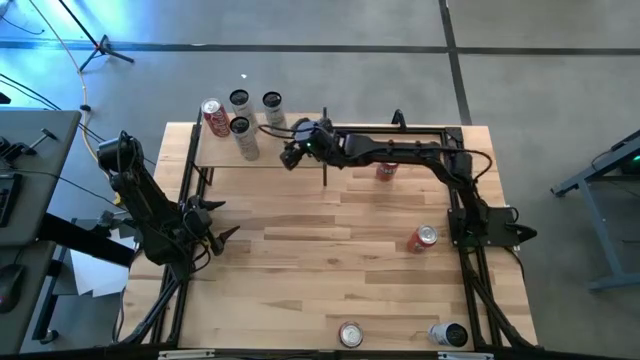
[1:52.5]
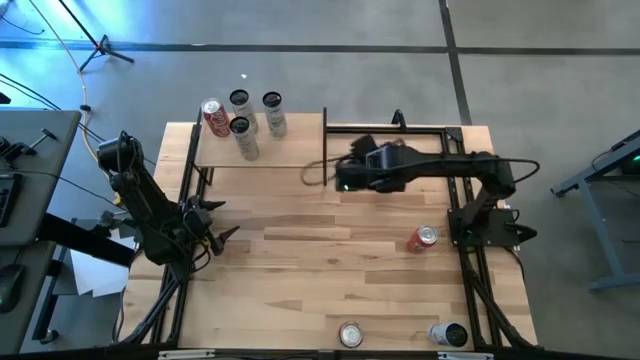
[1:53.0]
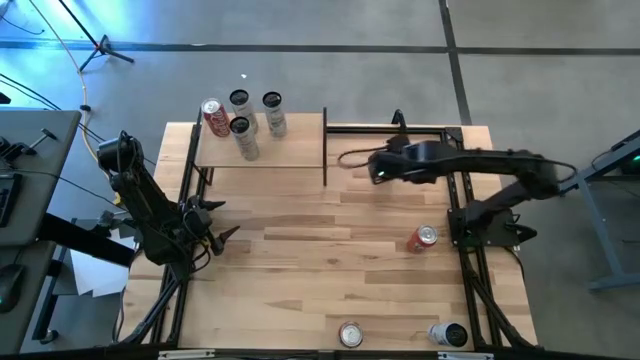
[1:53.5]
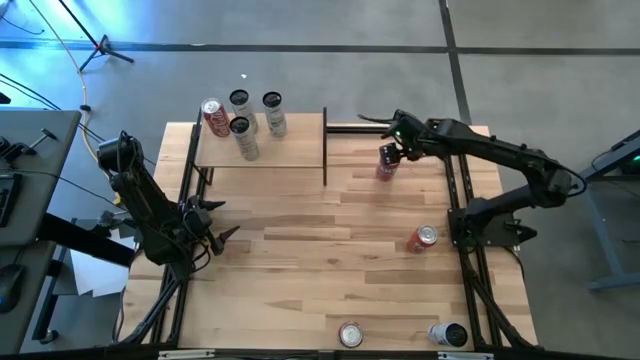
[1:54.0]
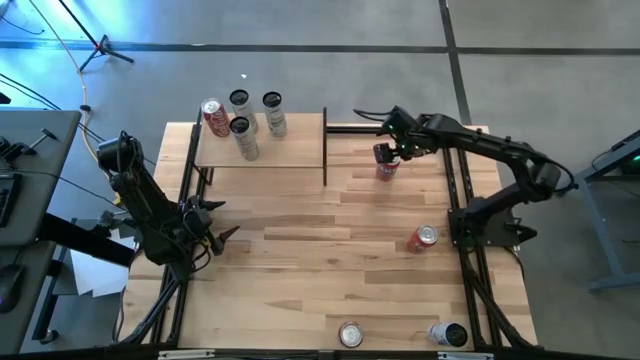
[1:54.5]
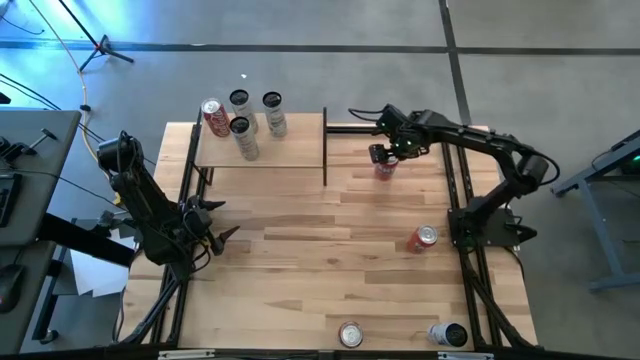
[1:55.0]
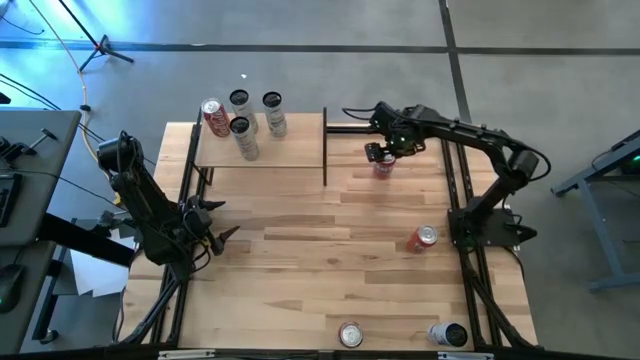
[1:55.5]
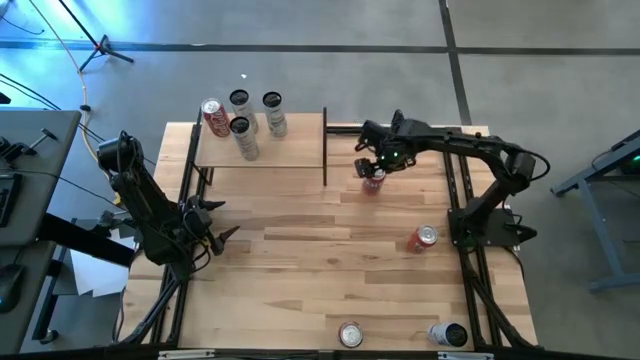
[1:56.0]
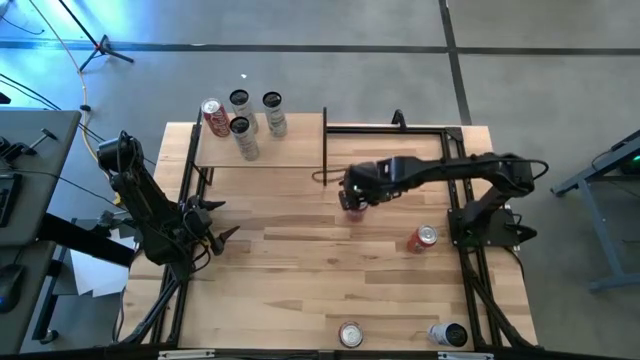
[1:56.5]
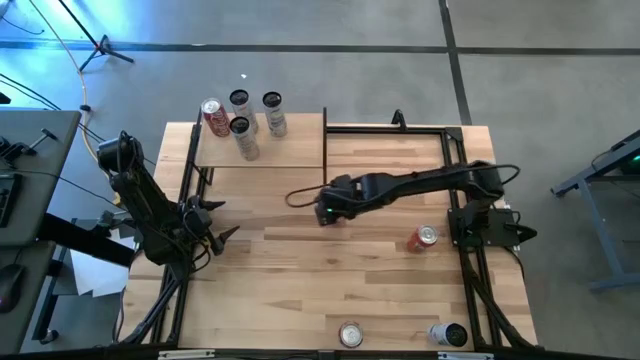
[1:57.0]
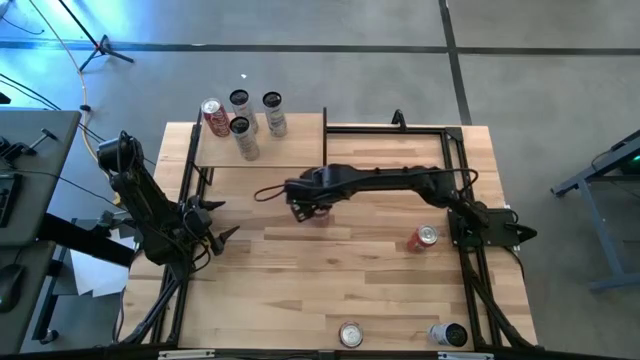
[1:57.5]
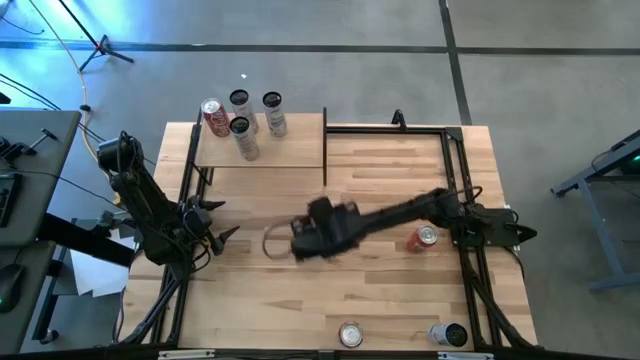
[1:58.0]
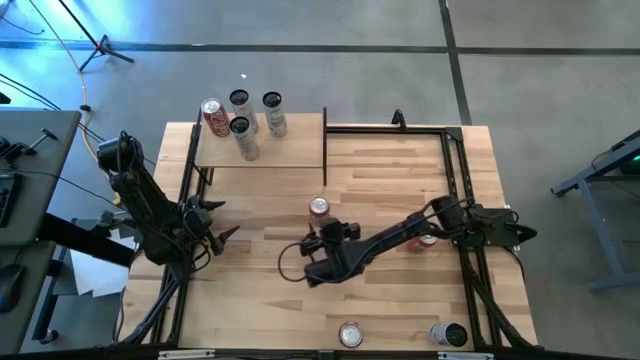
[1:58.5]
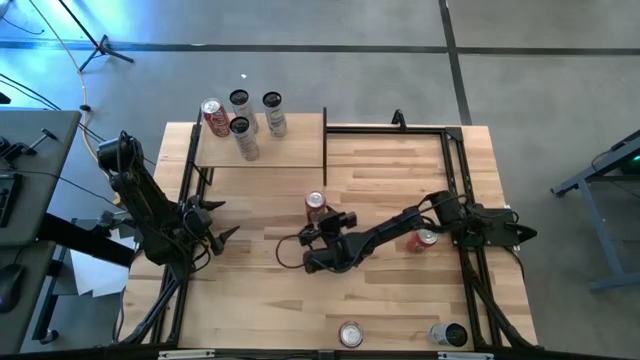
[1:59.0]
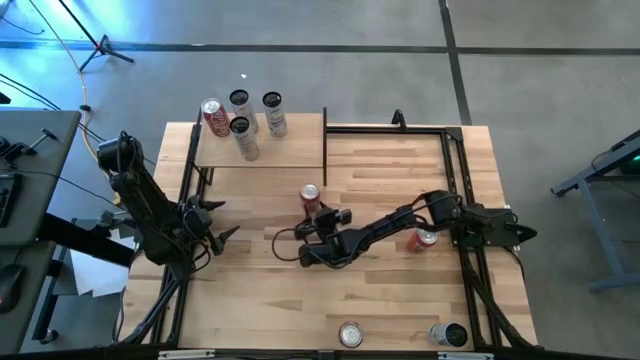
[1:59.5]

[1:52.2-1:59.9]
Task: Place canned beverage on shelf
Put the top orange soda can on the shelf

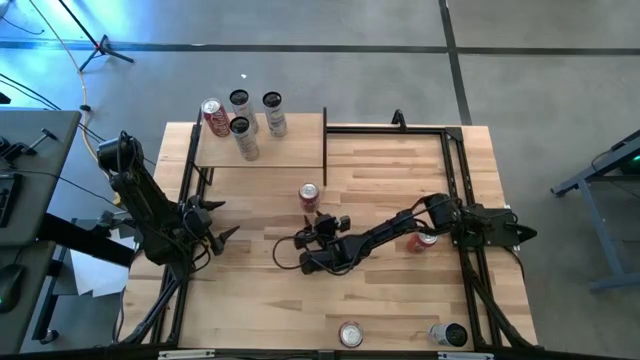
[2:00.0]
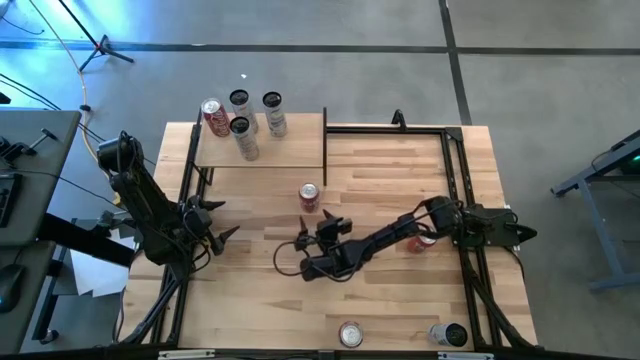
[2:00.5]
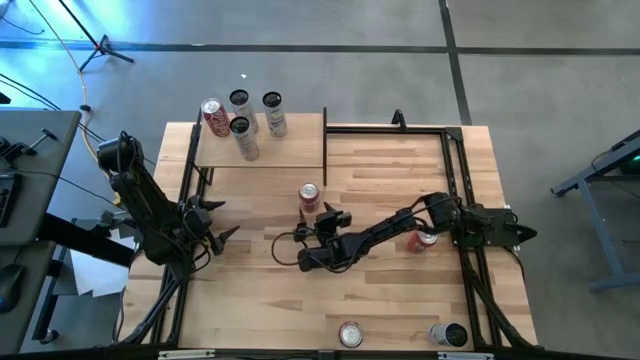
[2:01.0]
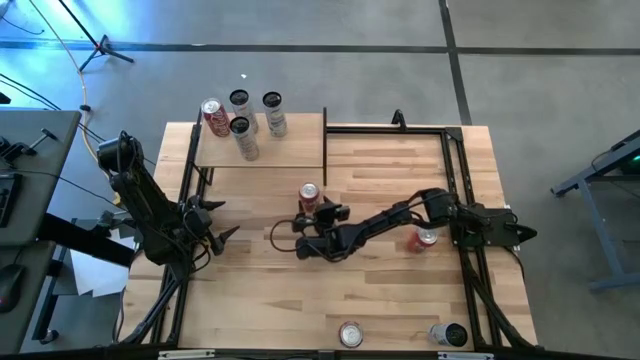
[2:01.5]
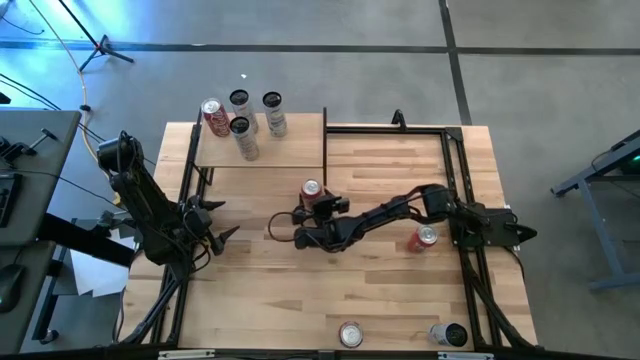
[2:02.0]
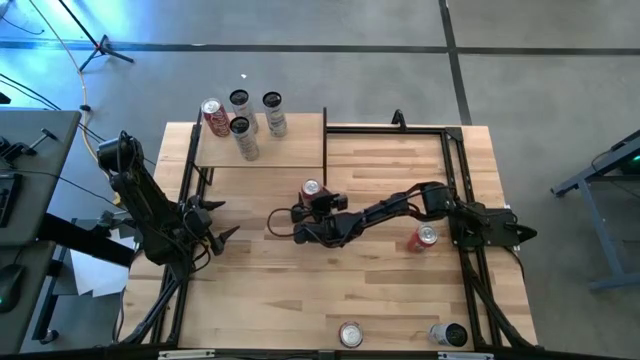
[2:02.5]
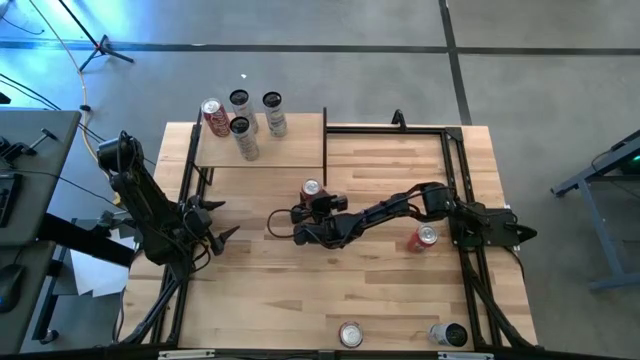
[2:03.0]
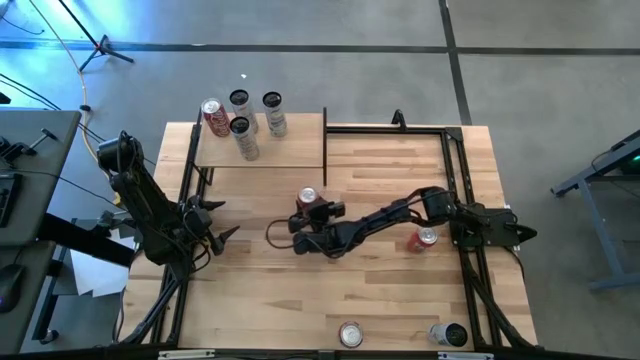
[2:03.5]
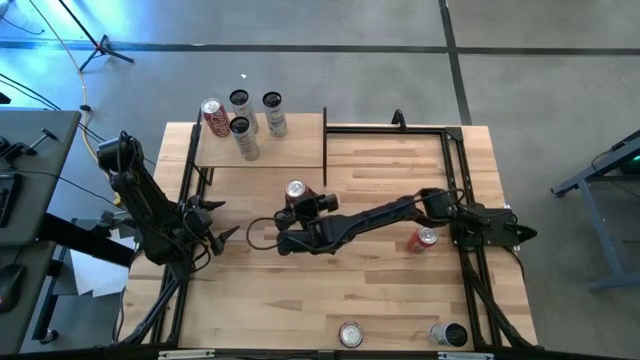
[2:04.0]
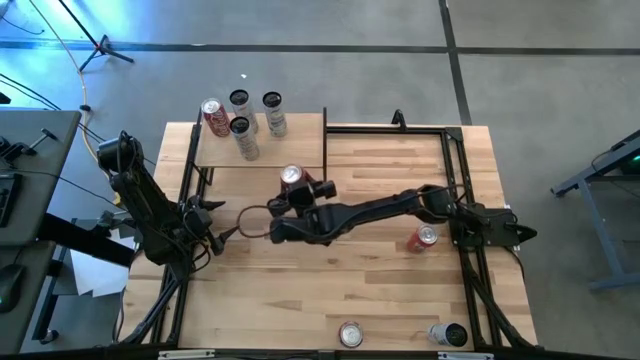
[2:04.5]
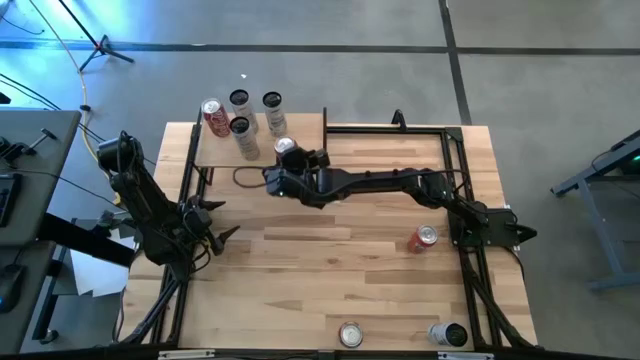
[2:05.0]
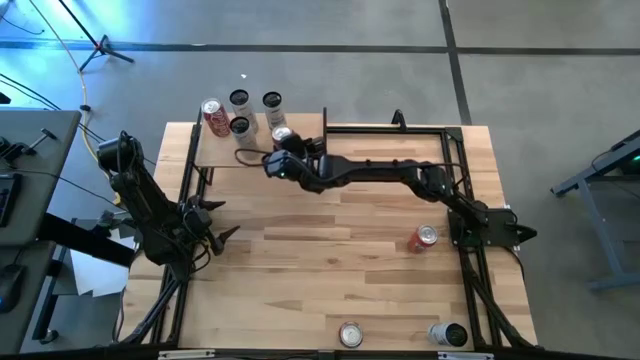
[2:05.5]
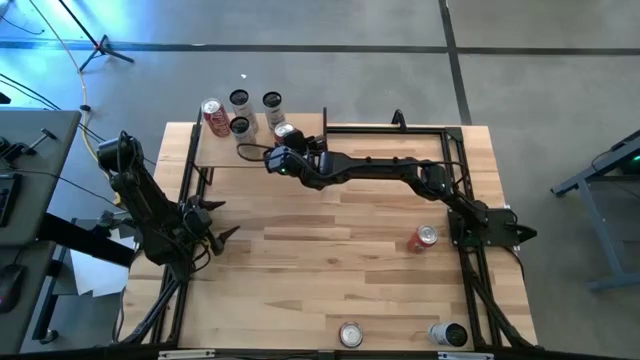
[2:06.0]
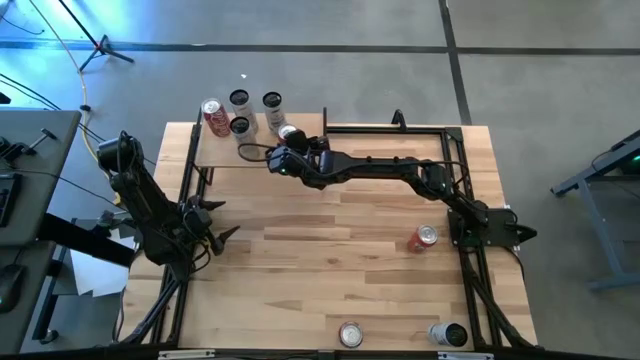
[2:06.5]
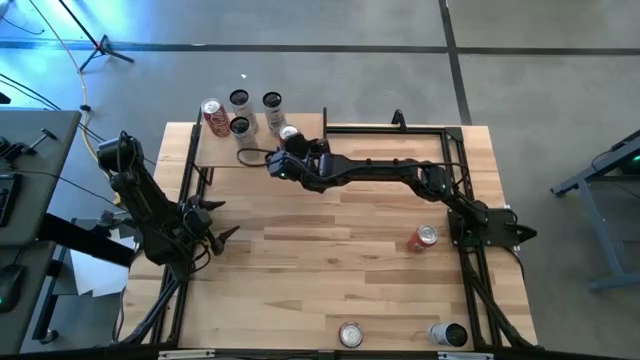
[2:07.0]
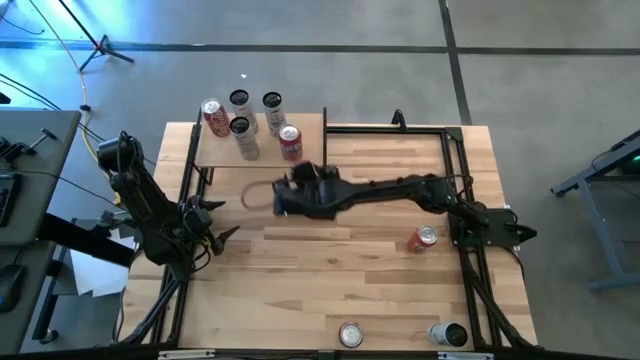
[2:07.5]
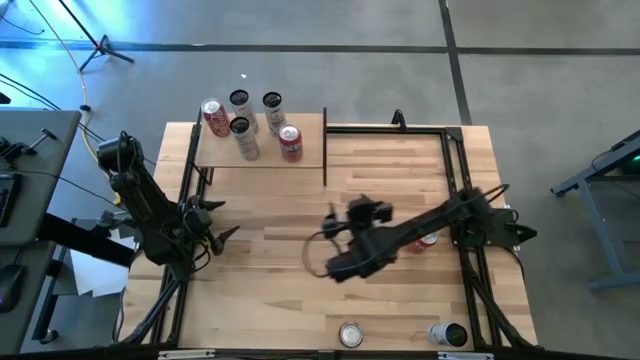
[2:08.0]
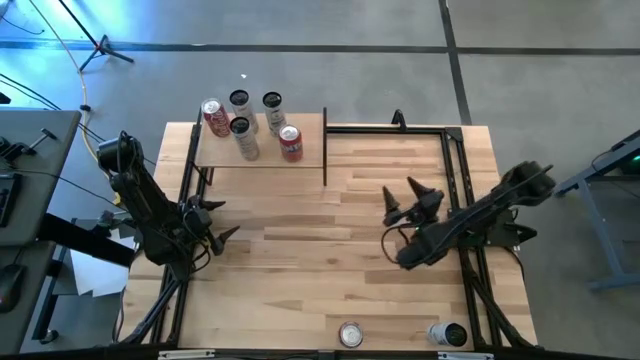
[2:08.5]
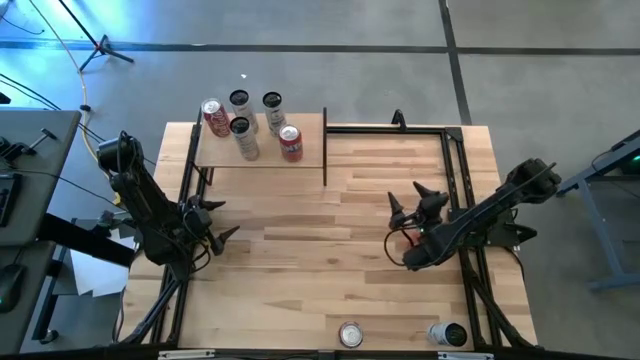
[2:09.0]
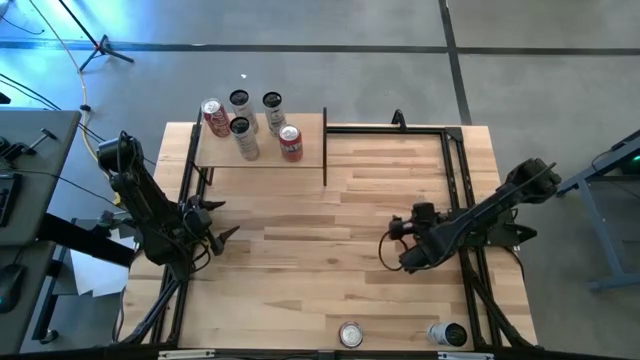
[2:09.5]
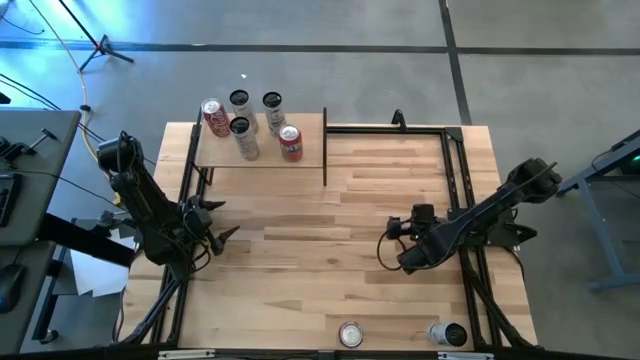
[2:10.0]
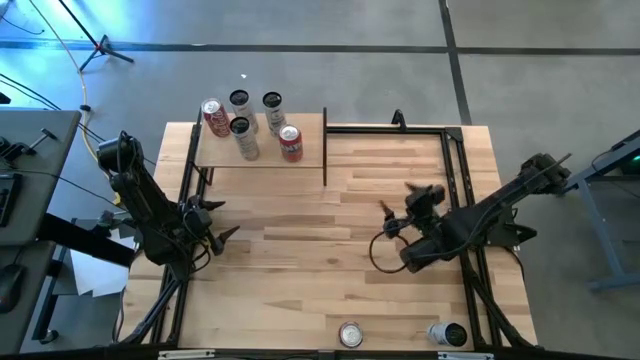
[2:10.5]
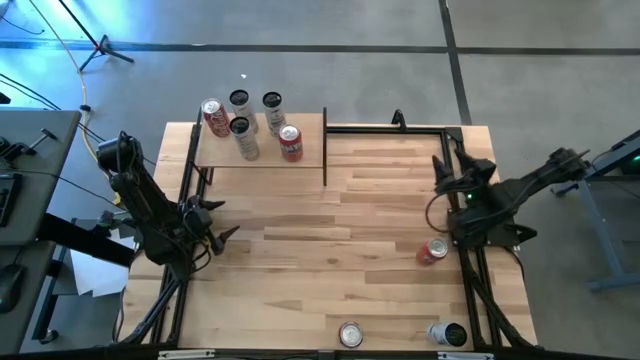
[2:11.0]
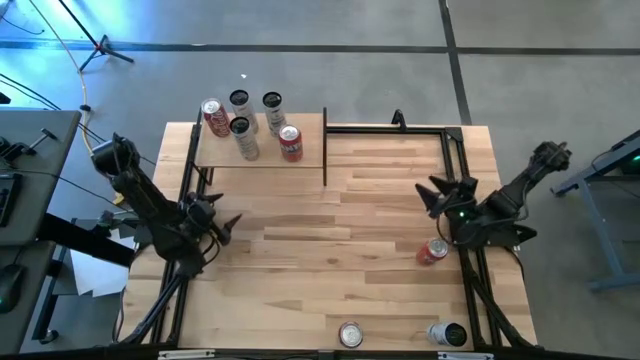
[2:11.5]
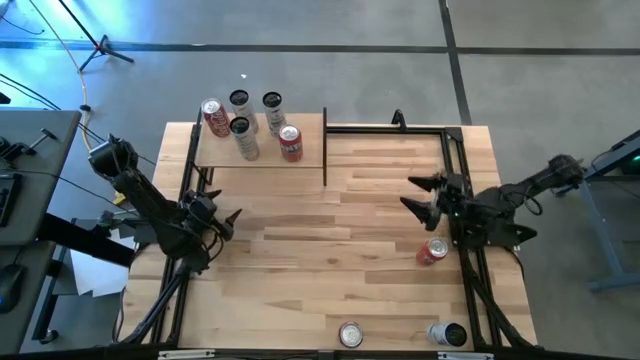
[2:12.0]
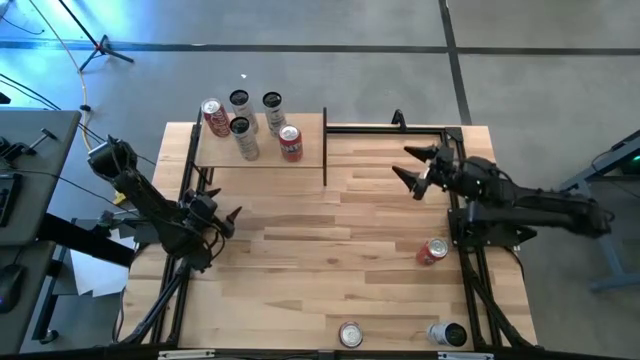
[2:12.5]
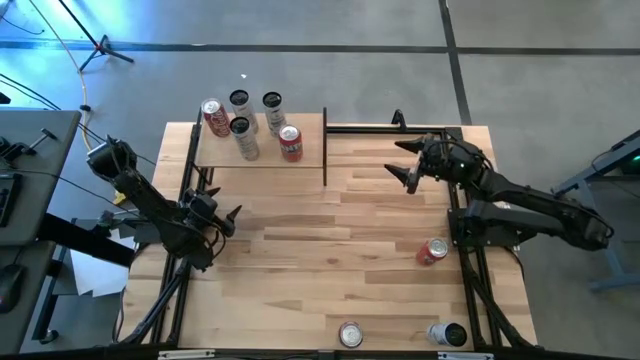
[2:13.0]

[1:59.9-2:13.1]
Put the top orange soda can on the shelf
